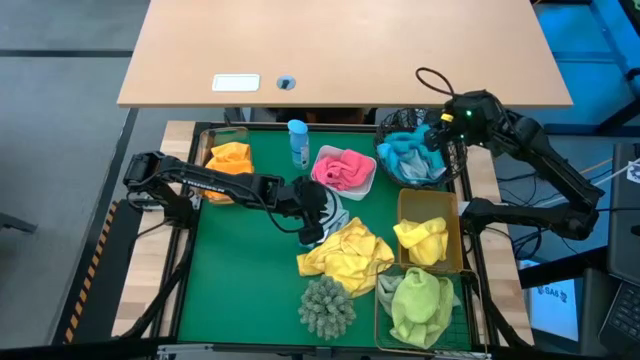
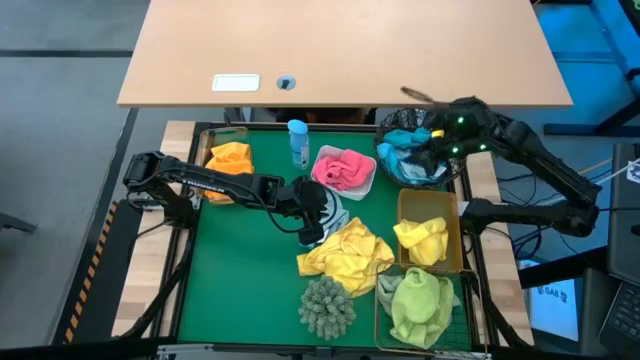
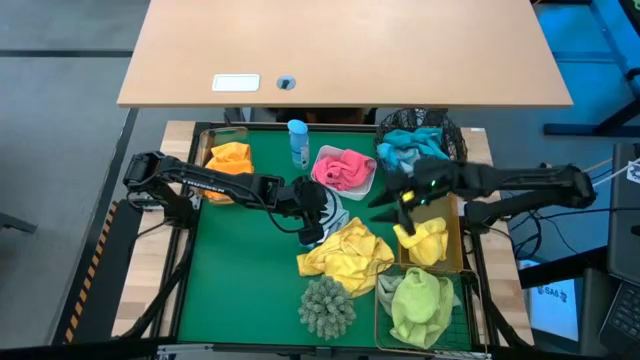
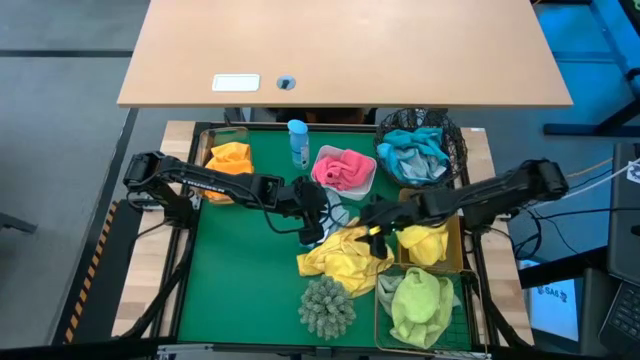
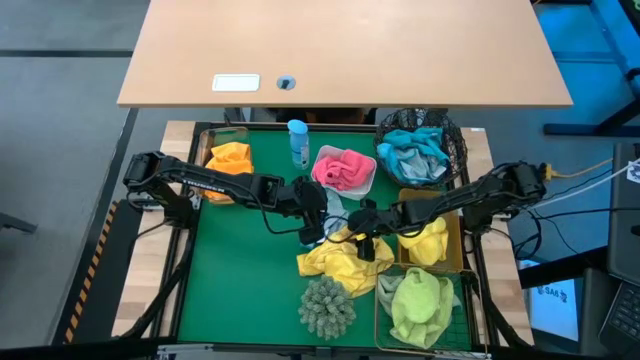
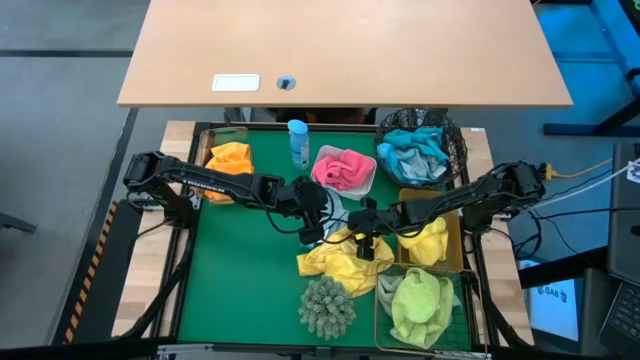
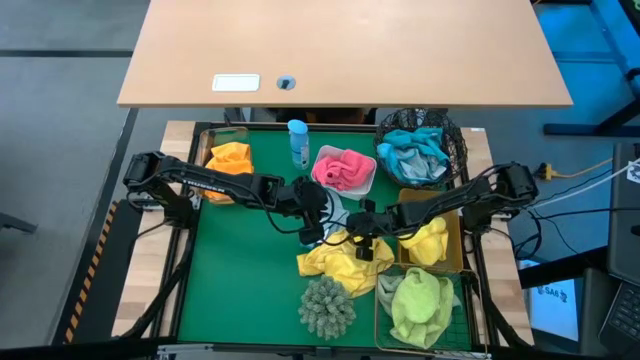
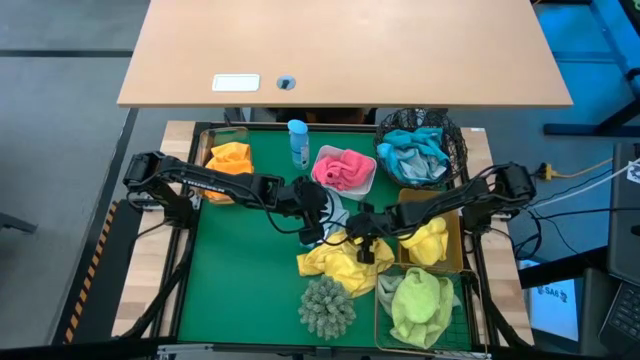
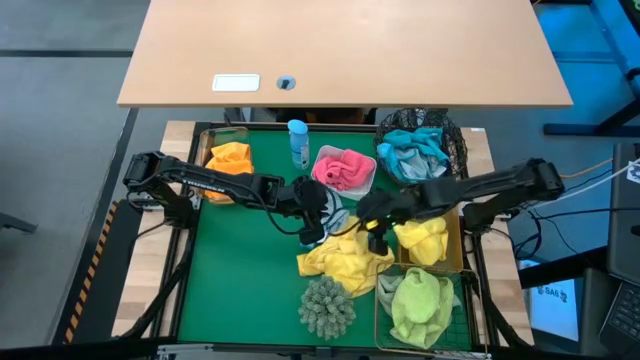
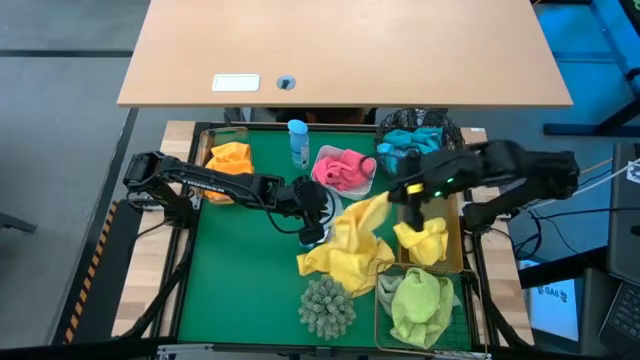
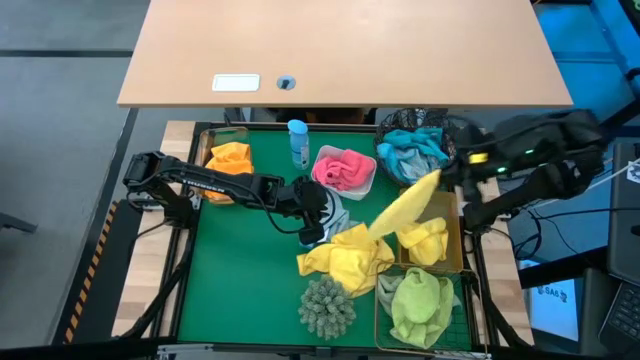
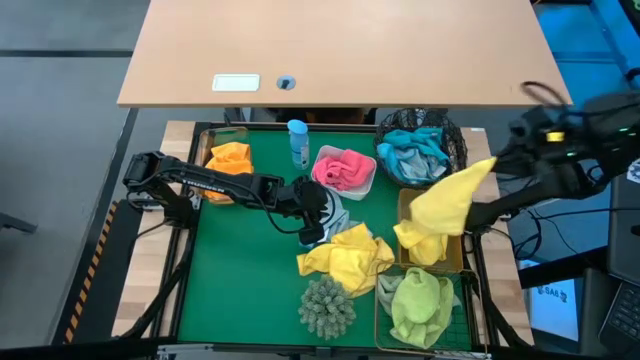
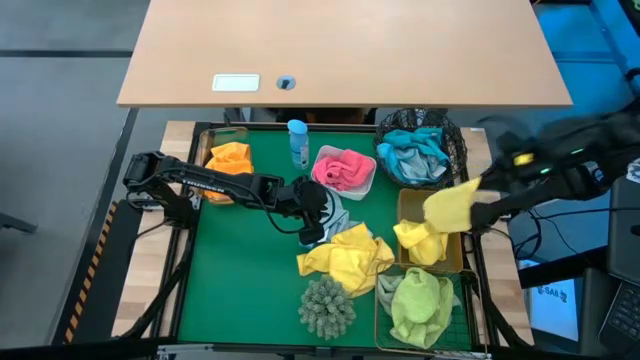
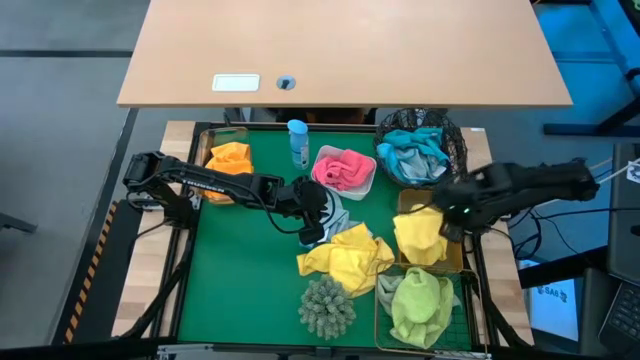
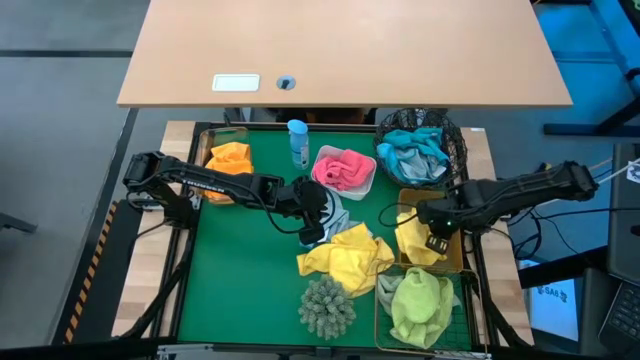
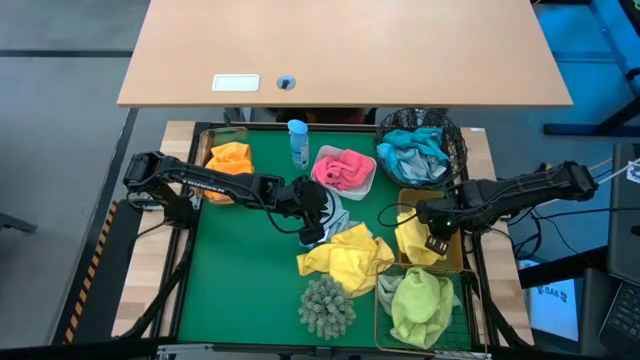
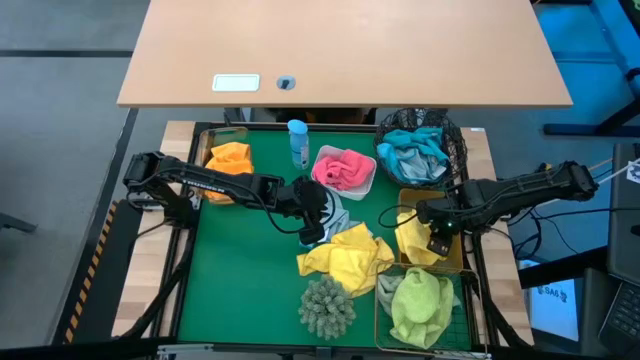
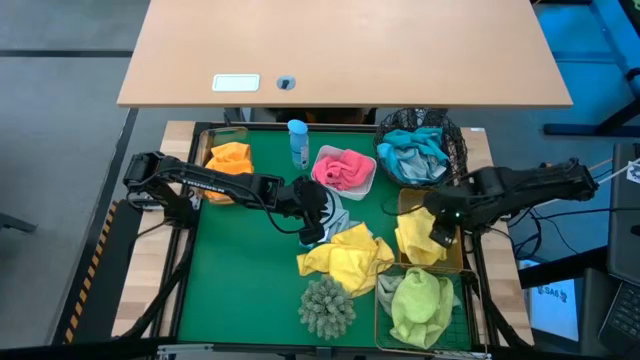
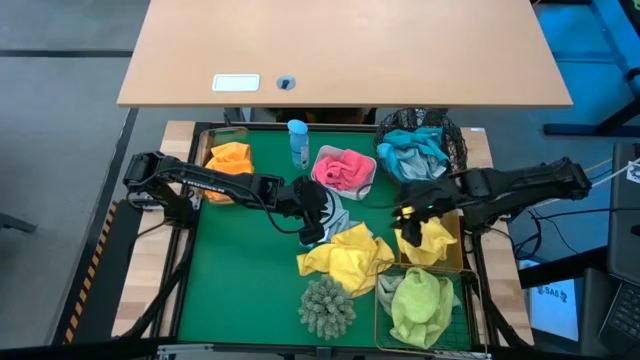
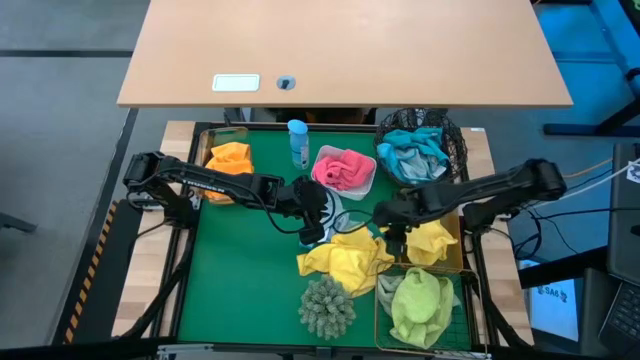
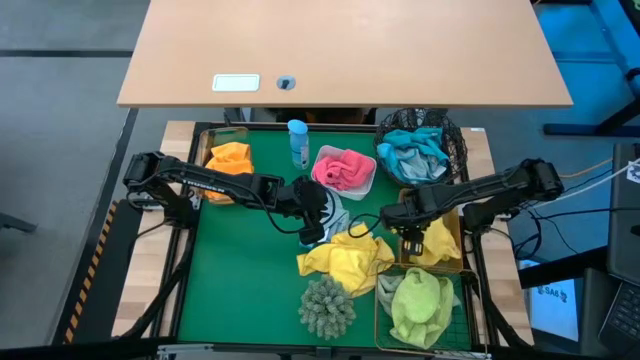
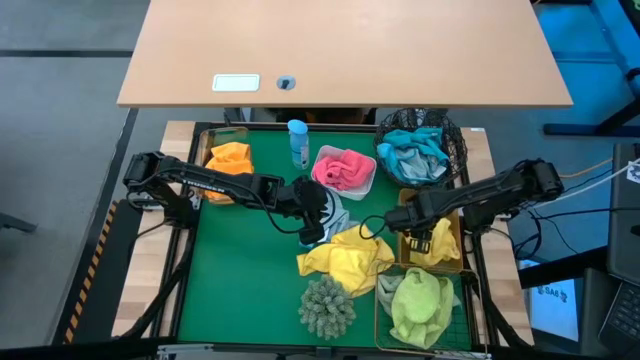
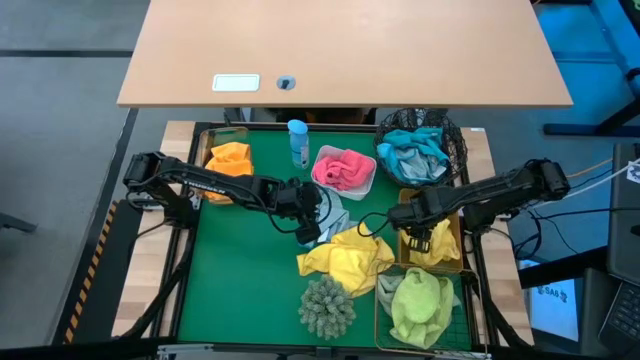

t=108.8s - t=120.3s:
Task: Sort microfiber towel by color & place in baskets
Put the yellow microfiber towel into the yellow bin

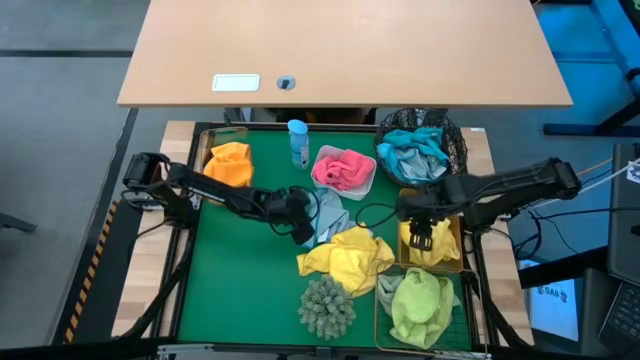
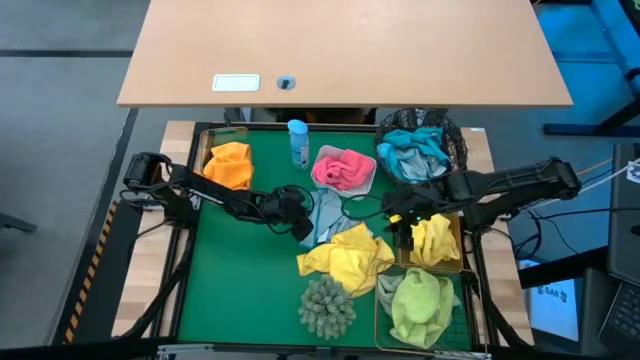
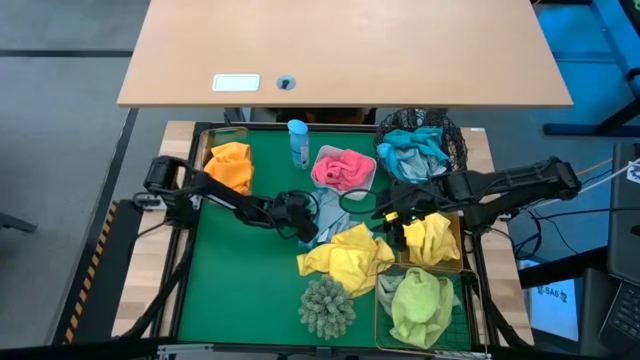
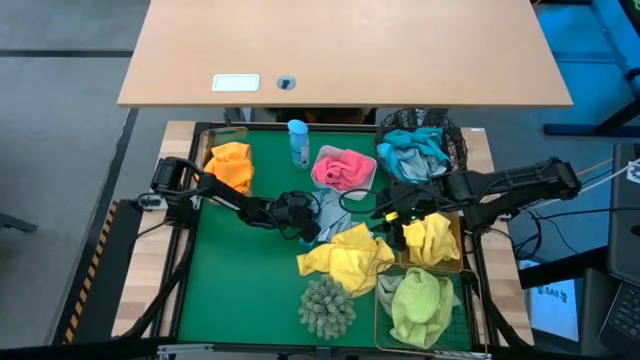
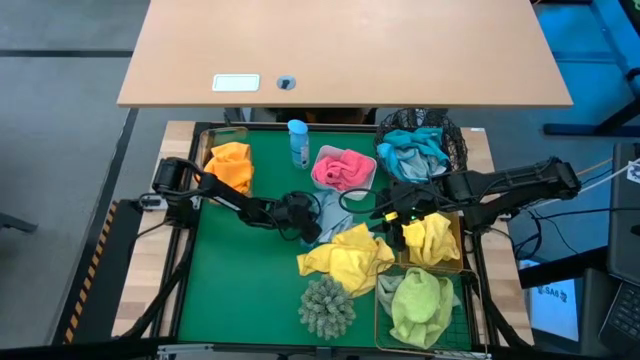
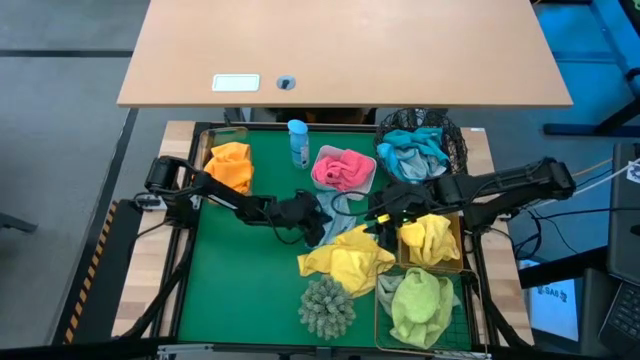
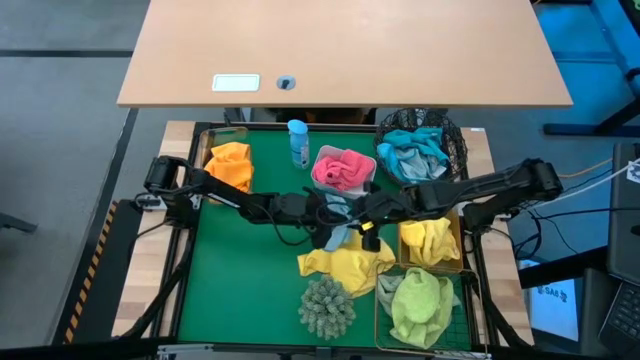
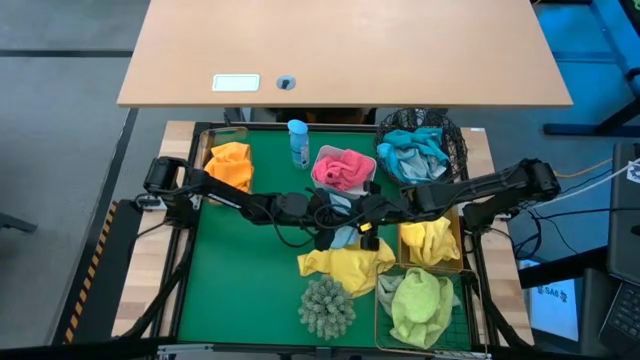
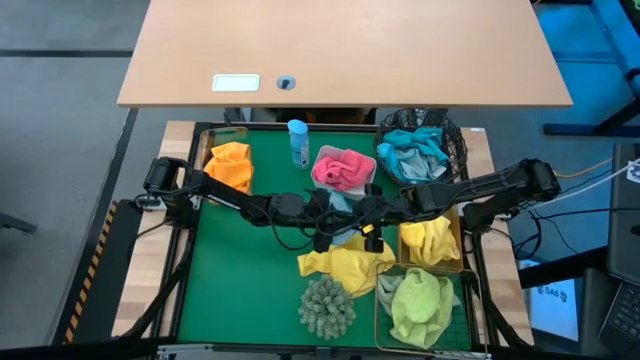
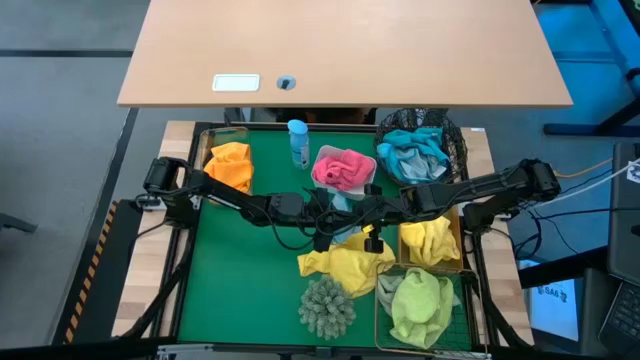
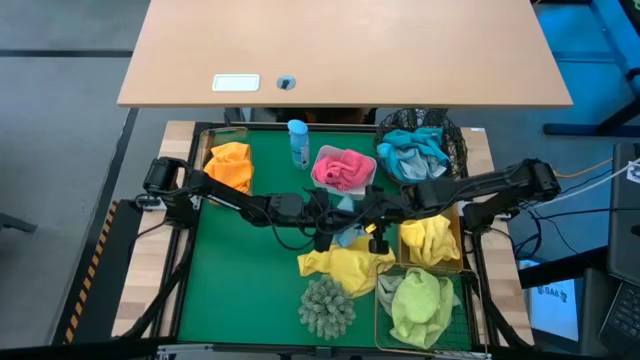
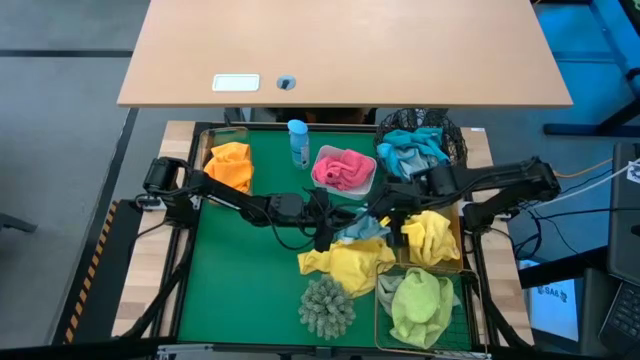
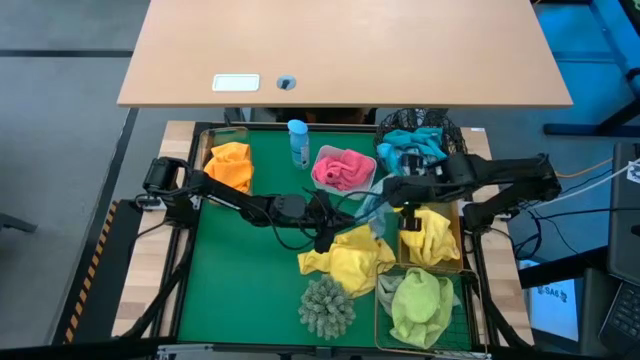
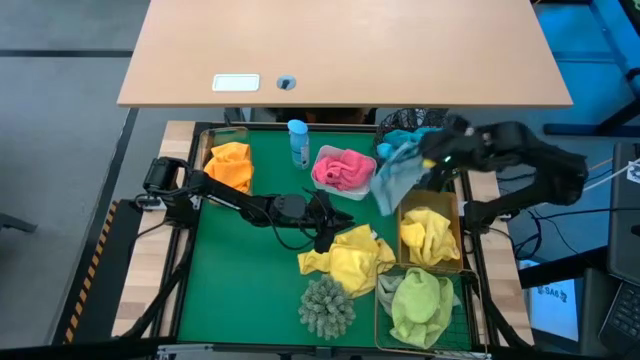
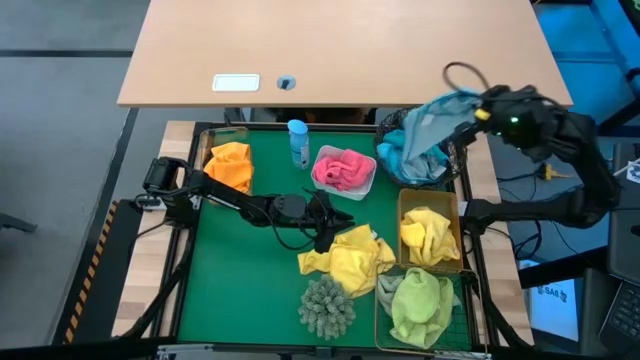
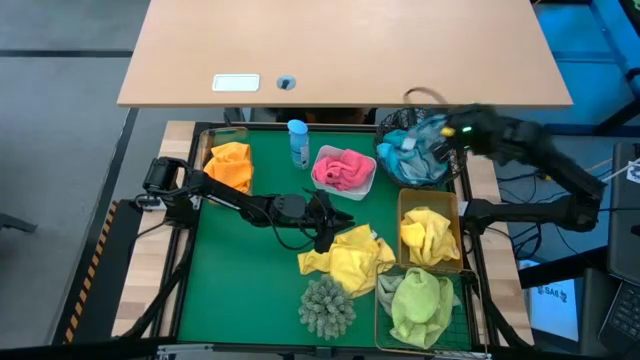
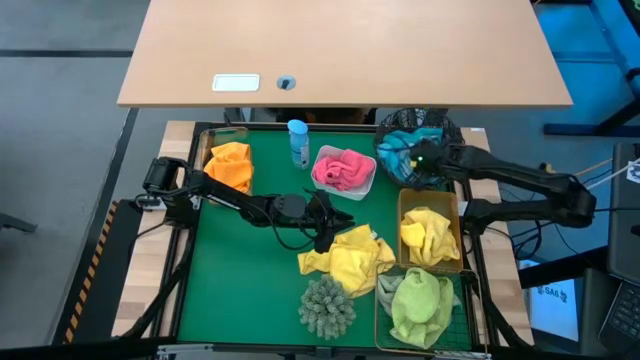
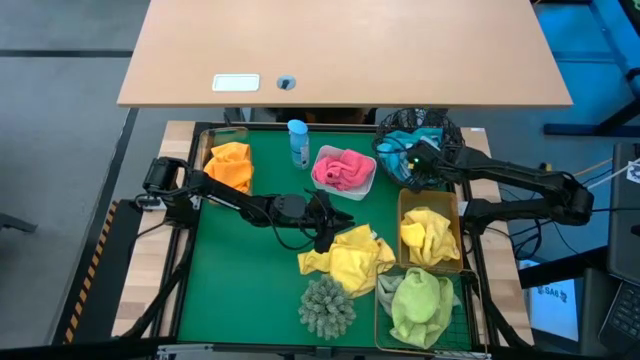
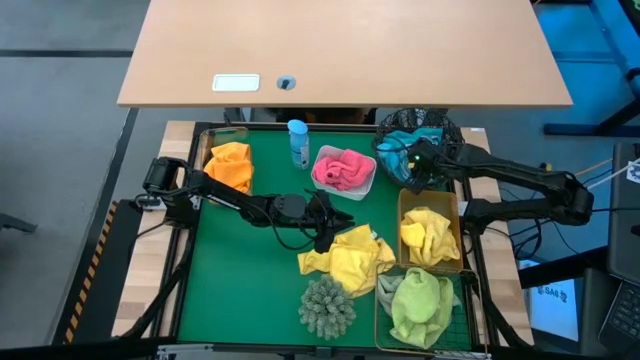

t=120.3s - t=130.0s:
Put the blue microfiber towel into the circular wire basket

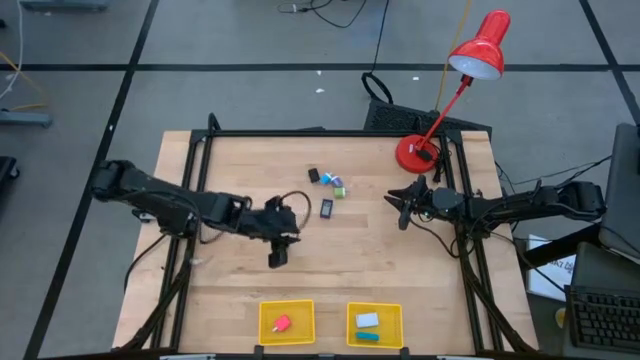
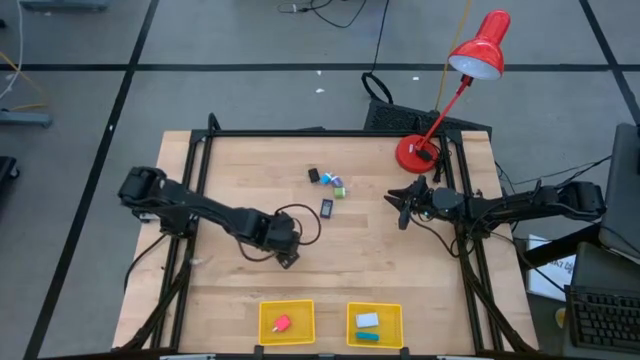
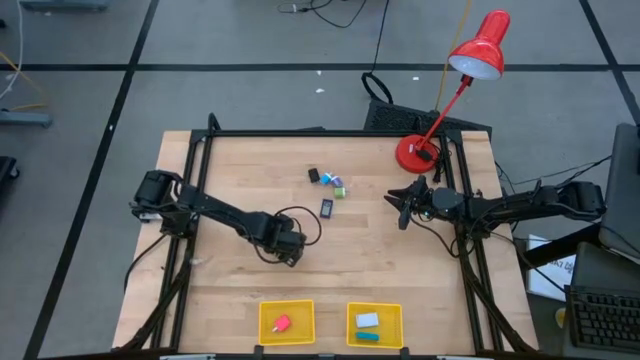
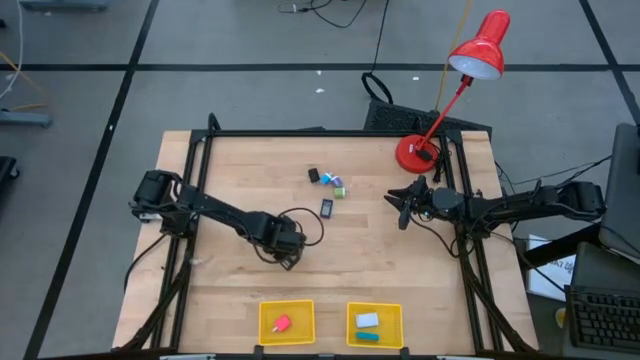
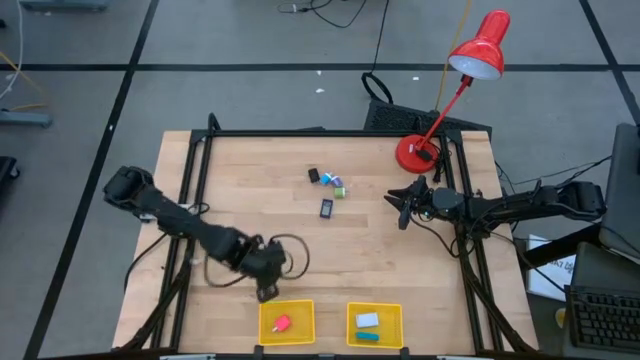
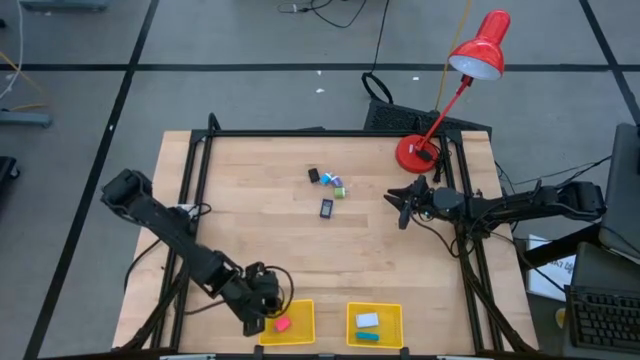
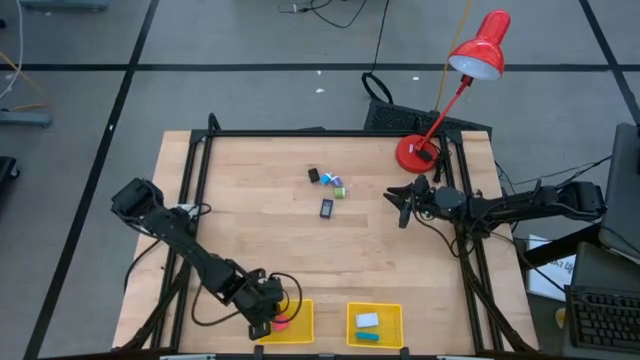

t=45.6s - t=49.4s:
Task: Pick & Place Office items
Put the bottom black adapter into the left yellow bin
